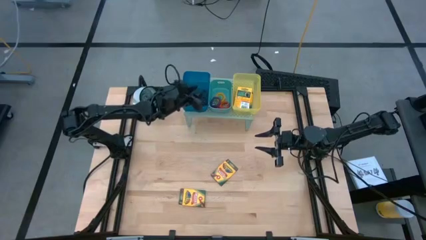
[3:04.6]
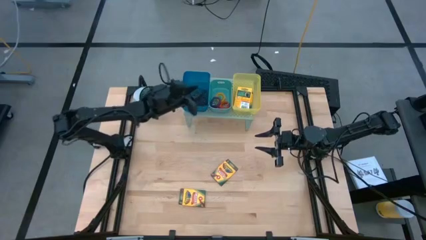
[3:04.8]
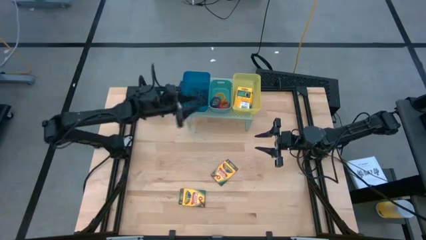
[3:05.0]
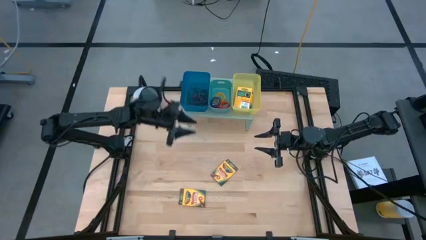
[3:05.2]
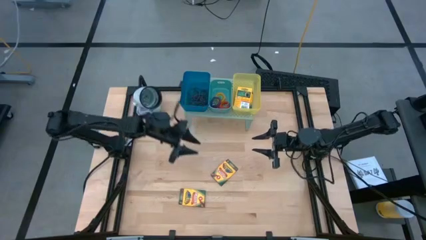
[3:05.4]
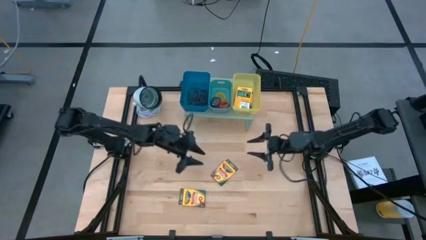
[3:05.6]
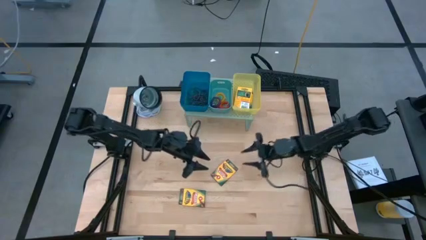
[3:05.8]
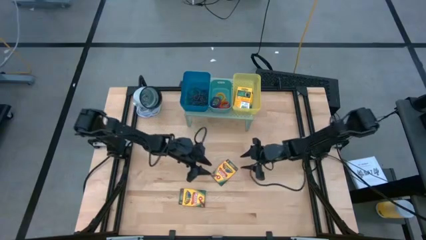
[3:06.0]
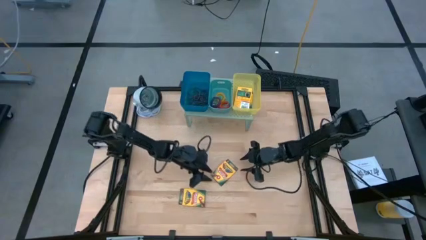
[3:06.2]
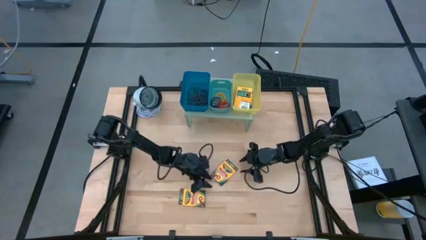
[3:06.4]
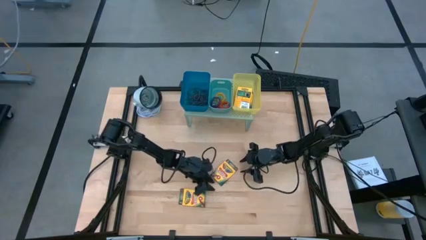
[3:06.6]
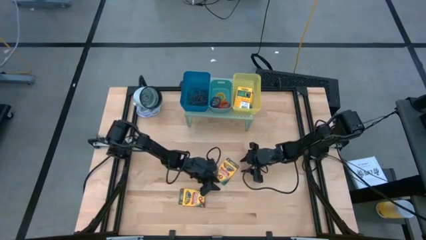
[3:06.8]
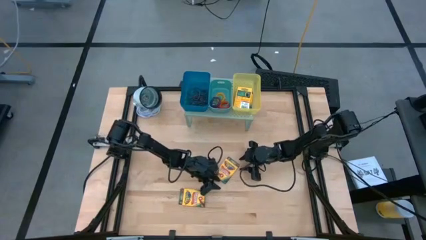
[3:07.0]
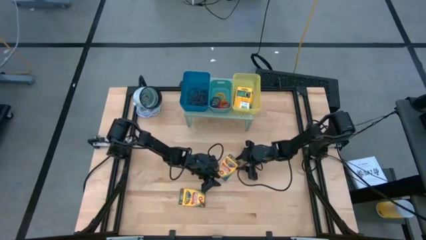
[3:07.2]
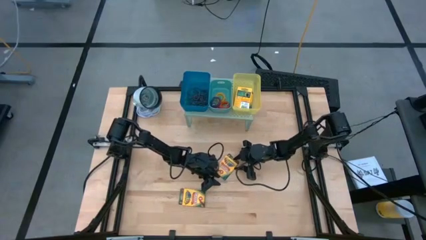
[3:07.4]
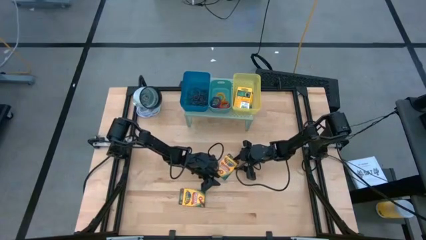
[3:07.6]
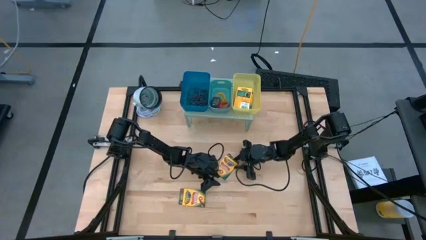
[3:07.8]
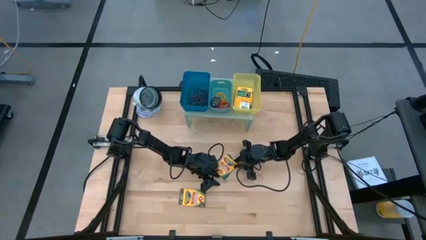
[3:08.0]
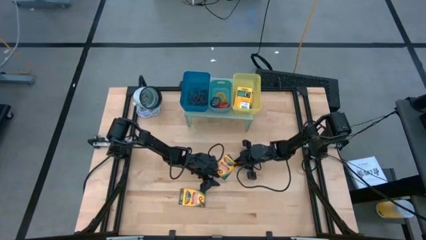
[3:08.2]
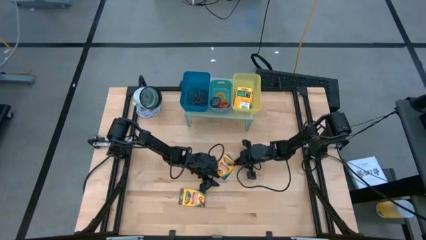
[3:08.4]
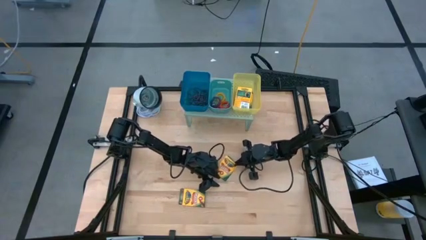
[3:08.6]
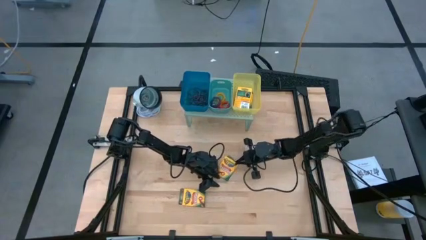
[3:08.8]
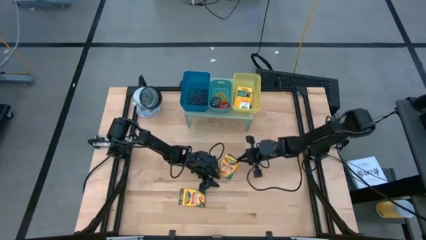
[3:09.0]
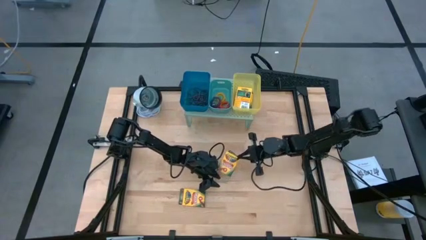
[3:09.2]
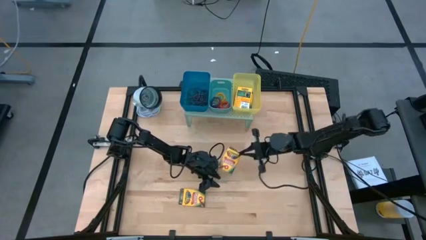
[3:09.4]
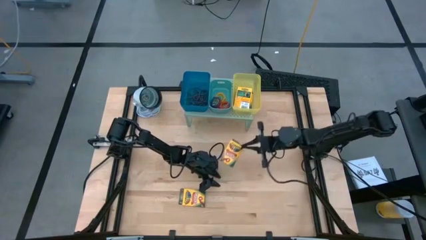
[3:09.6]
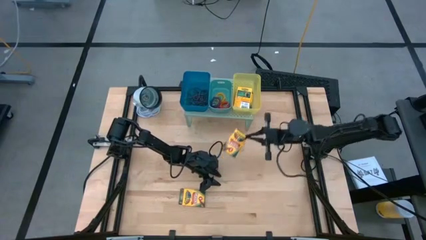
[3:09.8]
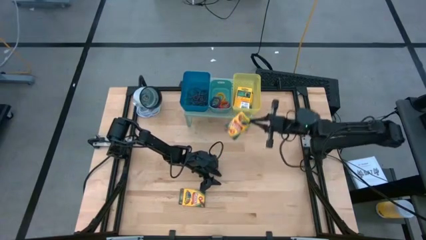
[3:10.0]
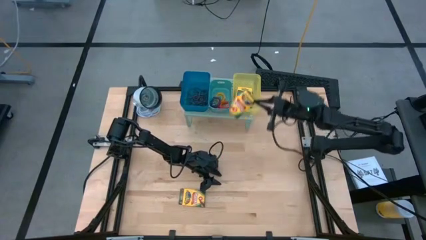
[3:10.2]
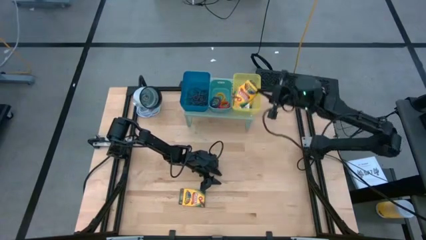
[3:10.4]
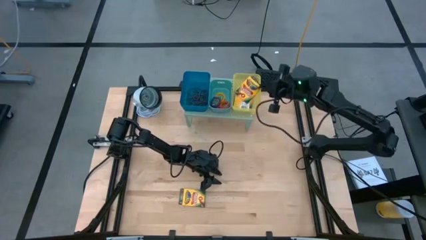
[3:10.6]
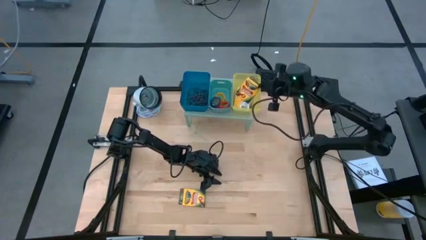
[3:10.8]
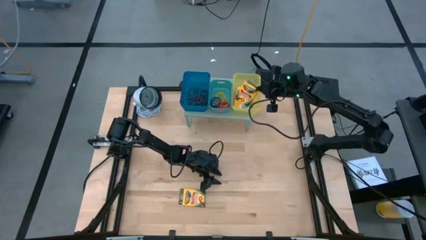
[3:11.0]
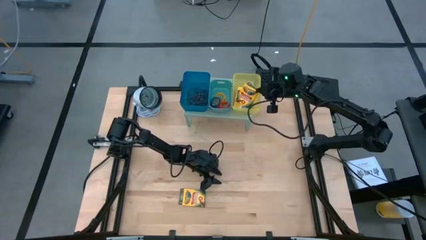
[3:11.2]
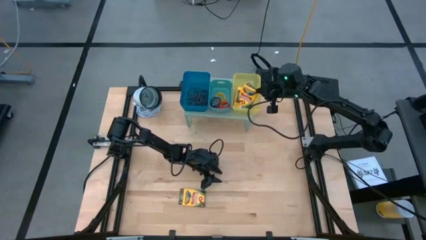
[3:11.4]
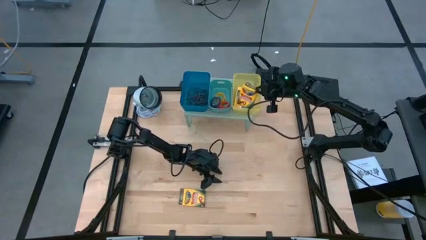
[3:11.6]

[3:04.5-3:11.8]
Task: Pick & Place Office Desk Supplies
Put the yellow crayon box into the yellow bin on the shelf

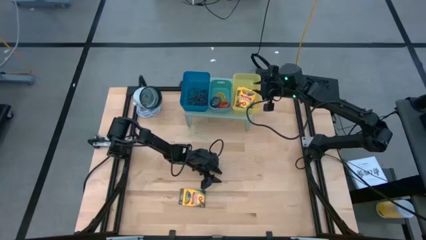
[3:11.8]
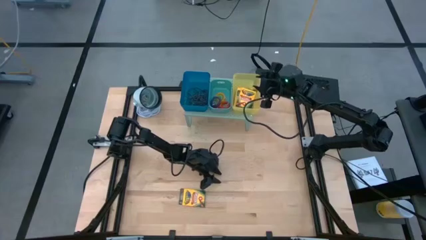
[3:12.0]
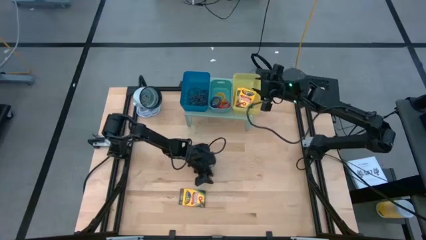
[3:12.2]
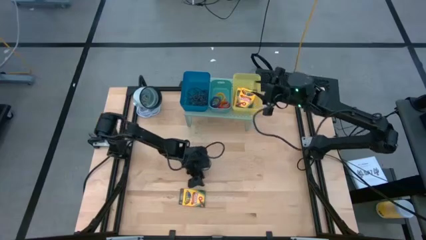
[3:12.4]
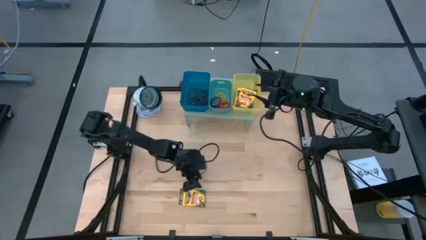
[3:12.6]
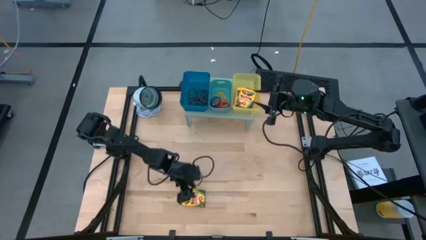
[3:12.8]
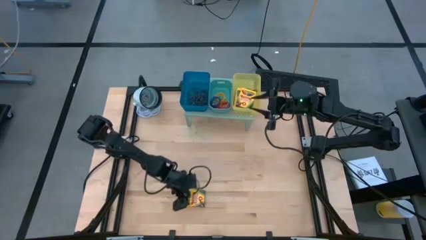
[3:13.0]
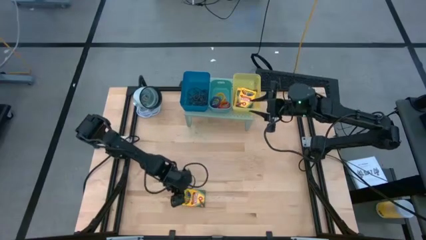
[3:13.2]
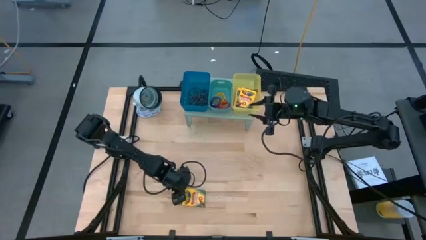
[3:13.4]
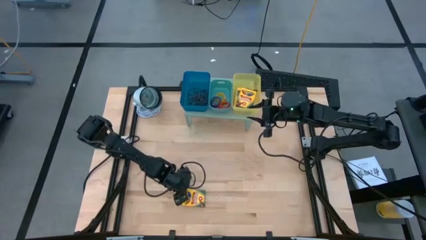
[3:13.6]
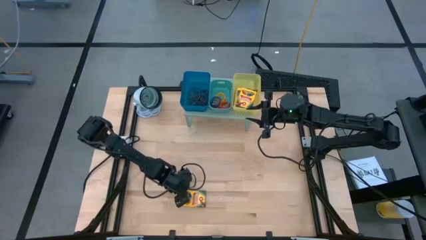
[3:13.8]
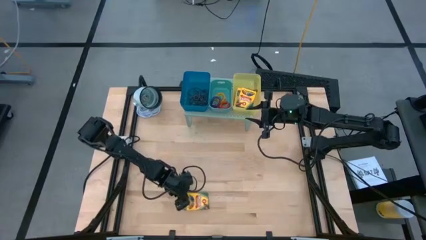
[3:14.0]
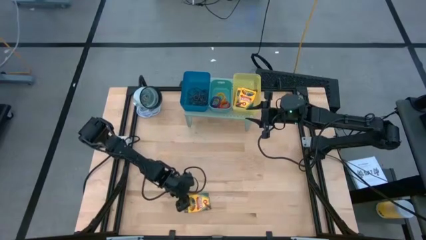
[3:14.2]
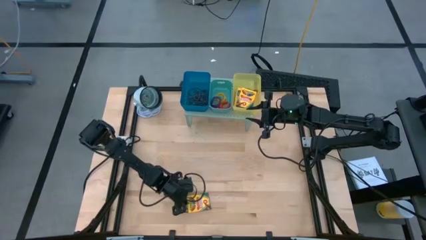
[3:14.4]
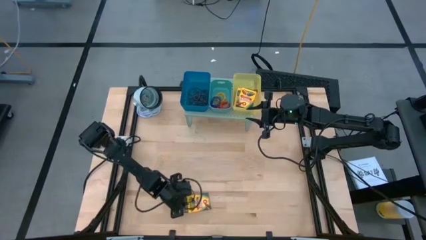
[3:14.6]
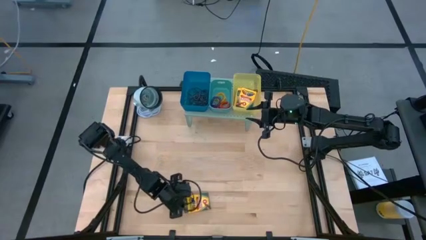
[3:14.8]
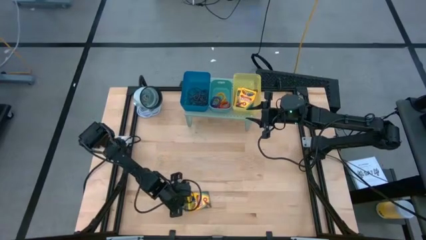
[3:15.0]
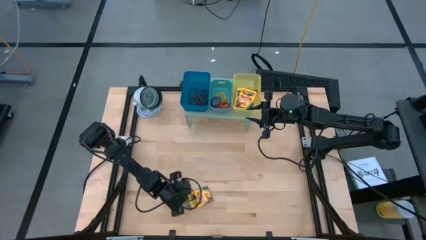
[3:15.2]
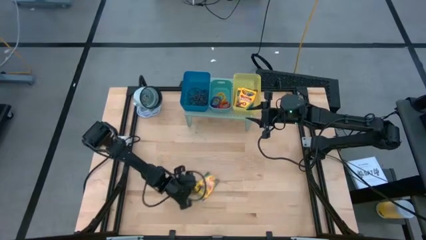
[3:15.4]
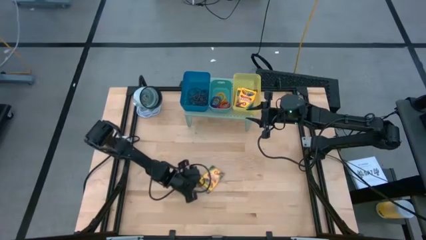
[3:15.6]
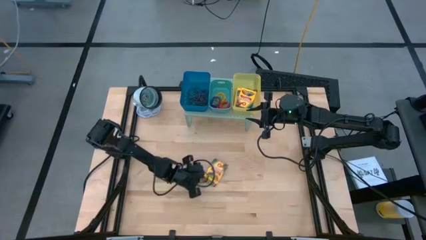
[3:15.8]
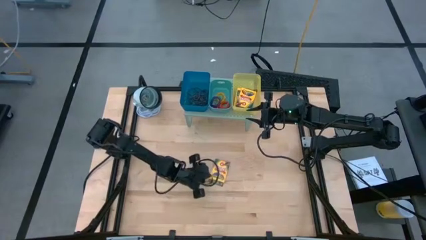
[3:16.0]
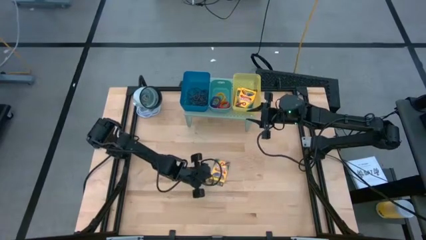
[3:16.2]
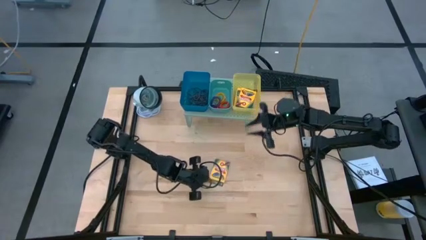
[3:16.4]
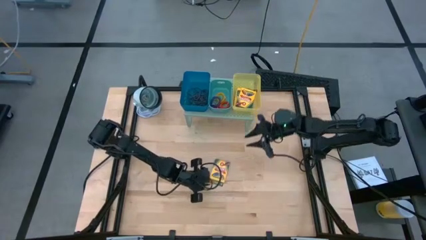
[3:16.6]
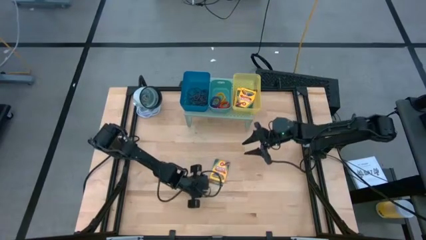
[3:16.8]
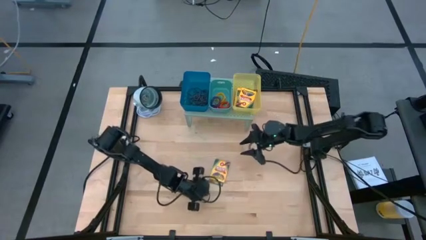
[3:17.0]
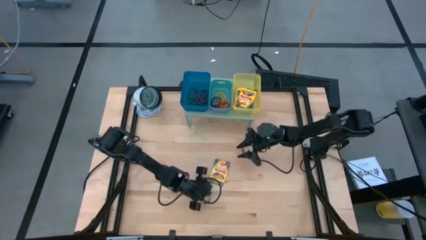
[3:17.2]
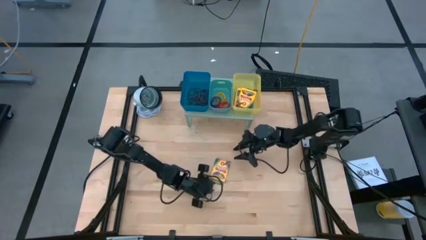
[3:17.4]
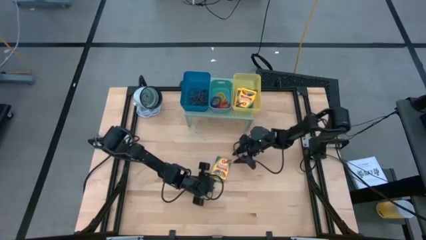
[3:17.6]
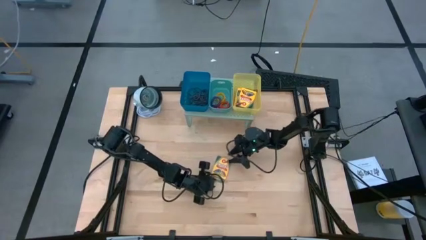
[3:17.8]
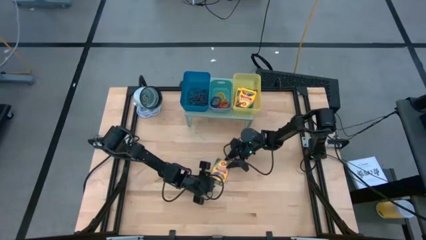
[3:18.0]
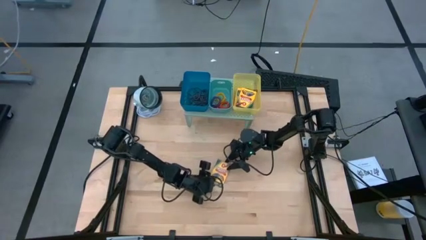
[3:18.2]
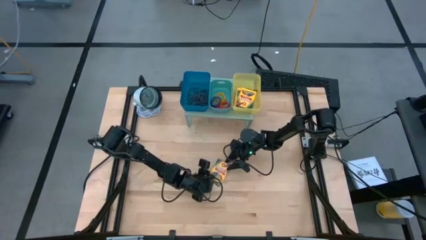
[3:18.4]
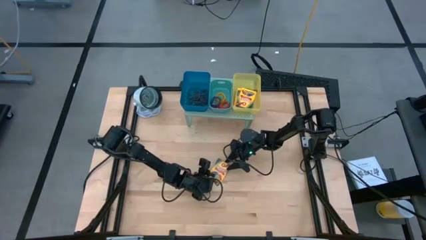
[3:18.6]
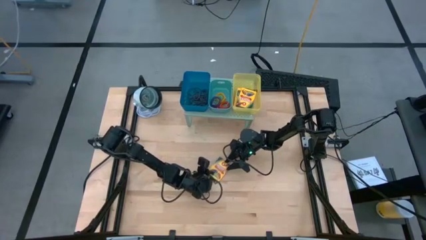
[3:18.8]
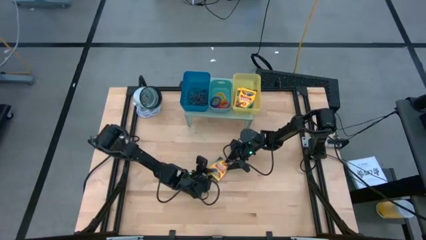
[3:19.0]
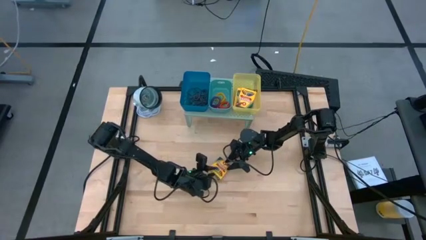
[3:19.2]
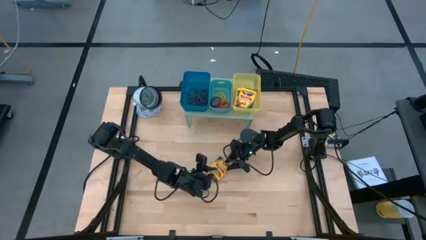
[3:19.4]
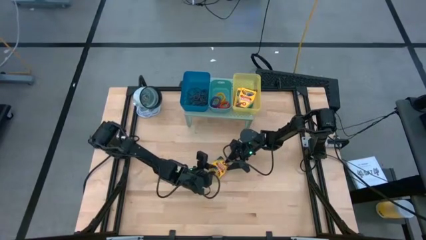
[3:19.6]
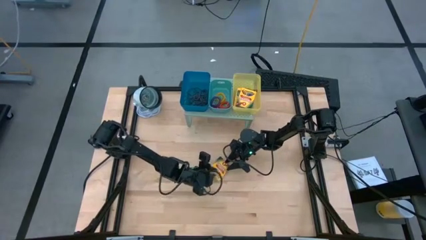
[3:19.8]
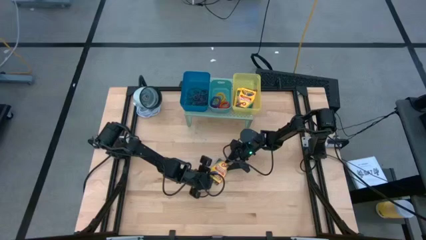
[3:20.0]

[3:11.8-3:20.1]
Put the yellow crayon box into the yellow bin on the shelf
